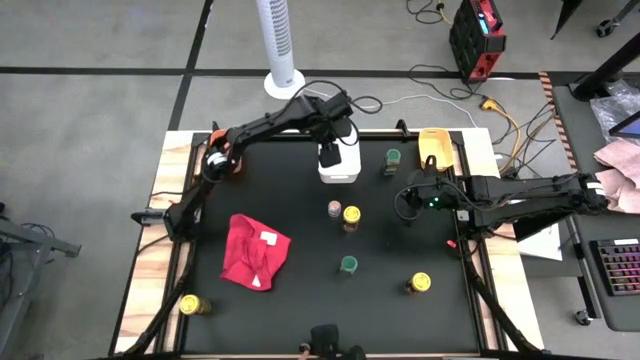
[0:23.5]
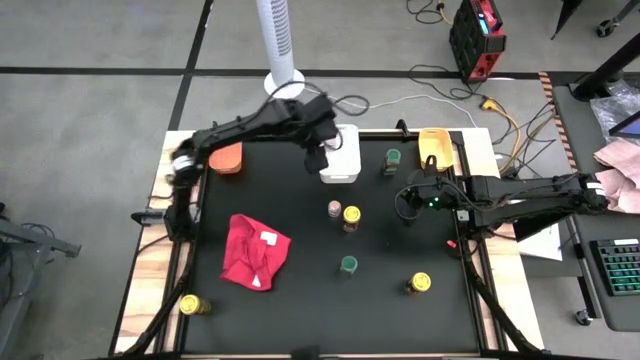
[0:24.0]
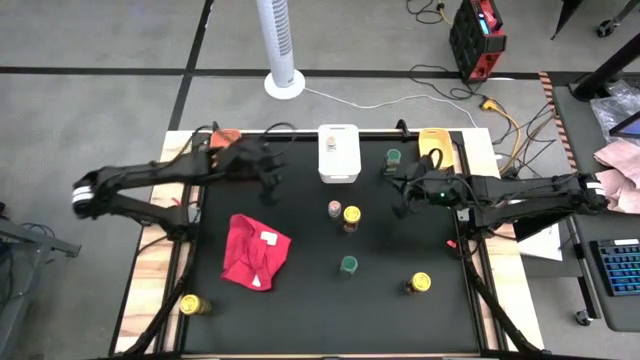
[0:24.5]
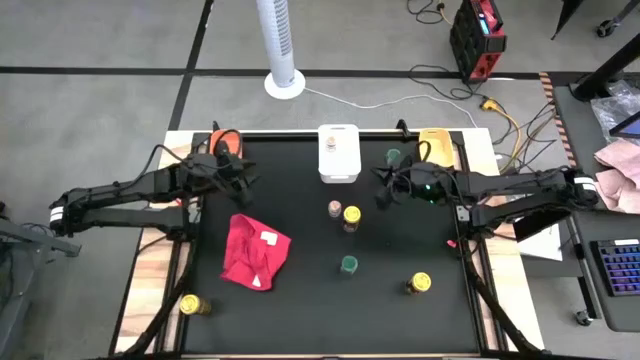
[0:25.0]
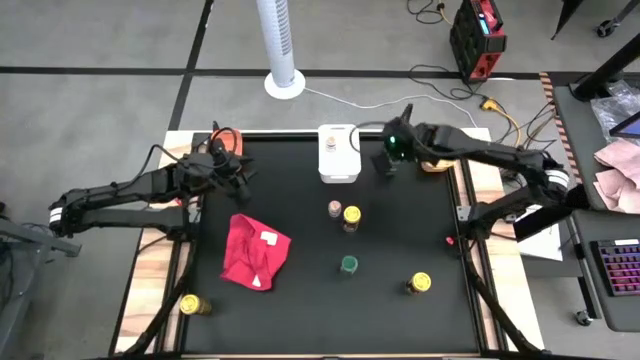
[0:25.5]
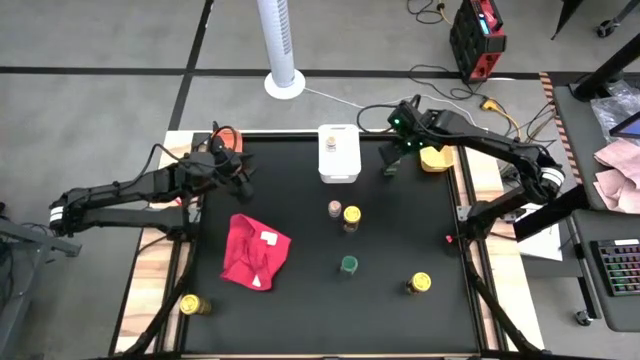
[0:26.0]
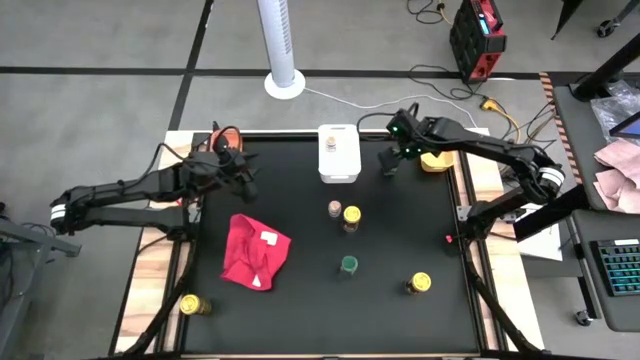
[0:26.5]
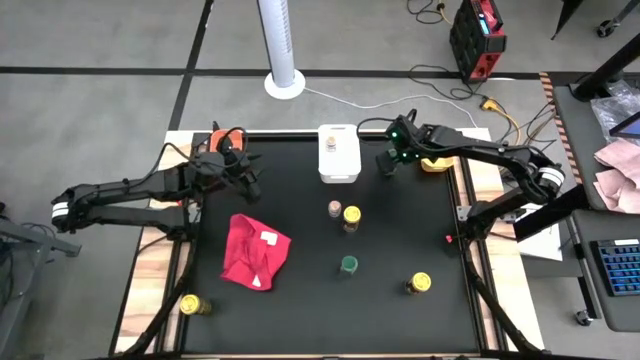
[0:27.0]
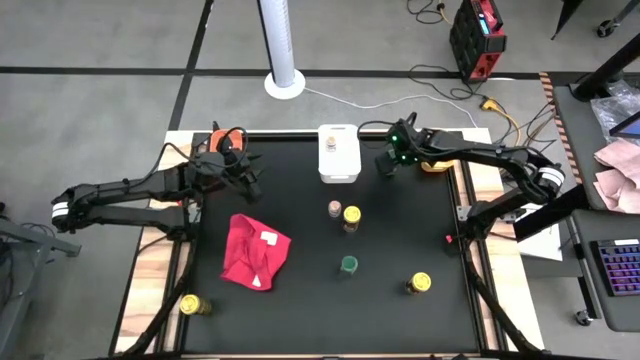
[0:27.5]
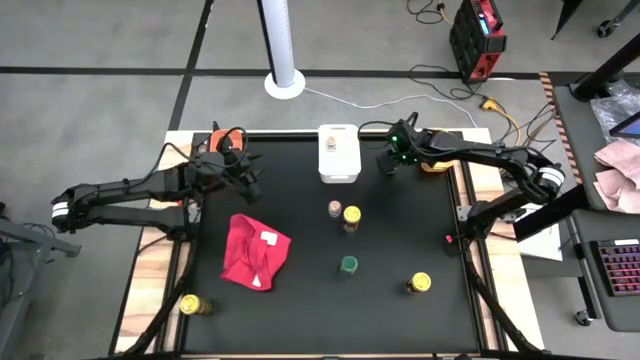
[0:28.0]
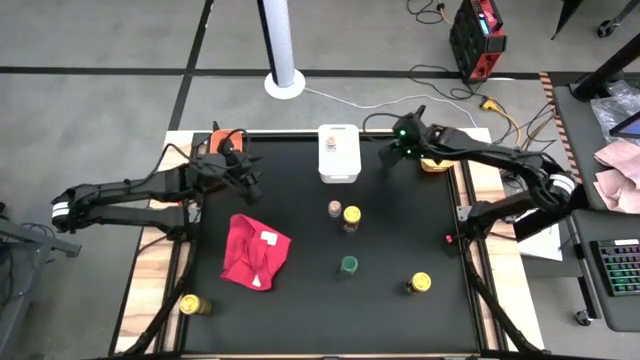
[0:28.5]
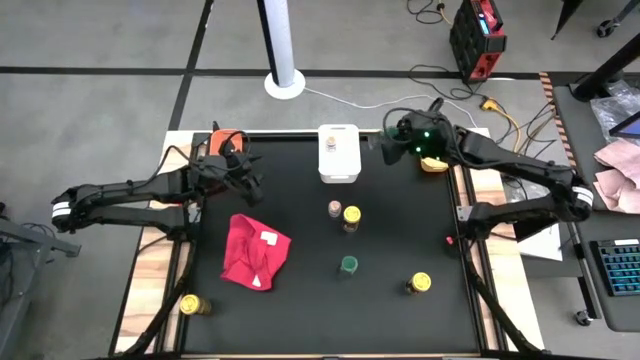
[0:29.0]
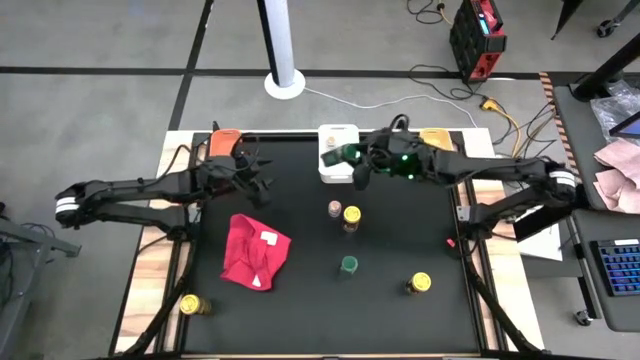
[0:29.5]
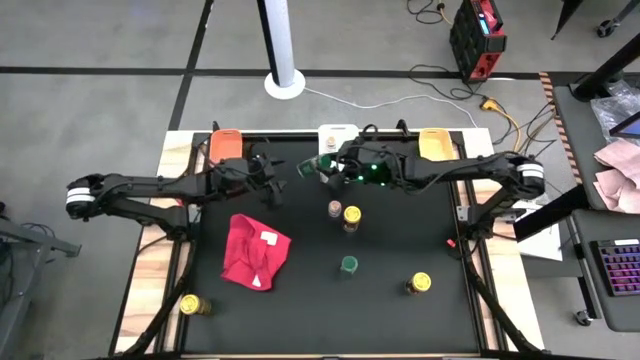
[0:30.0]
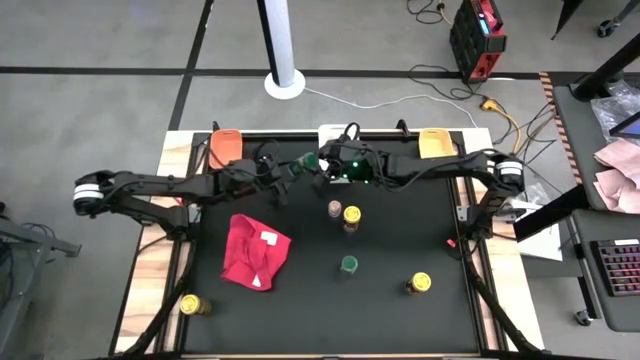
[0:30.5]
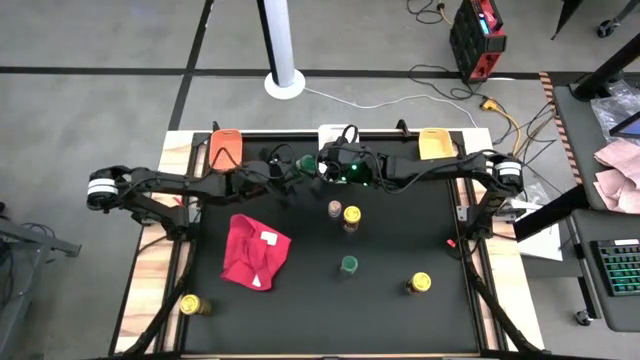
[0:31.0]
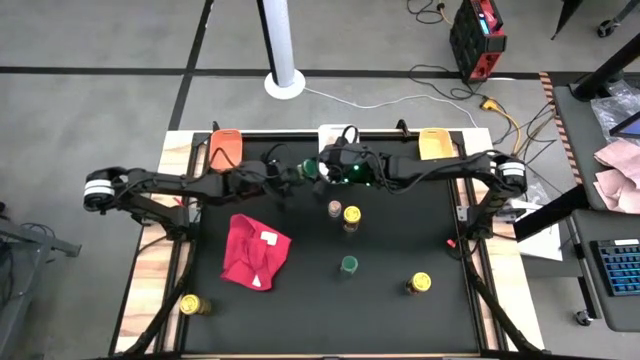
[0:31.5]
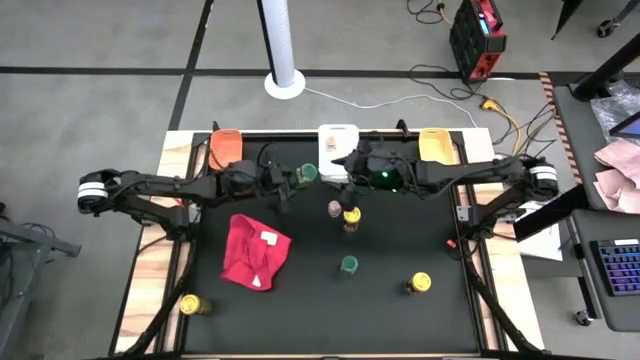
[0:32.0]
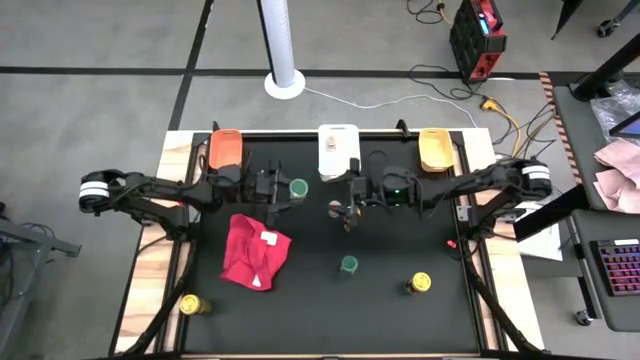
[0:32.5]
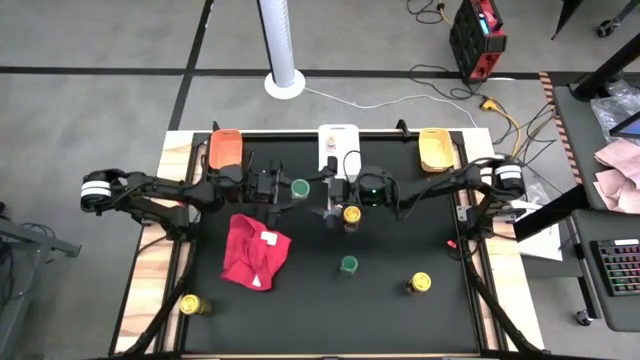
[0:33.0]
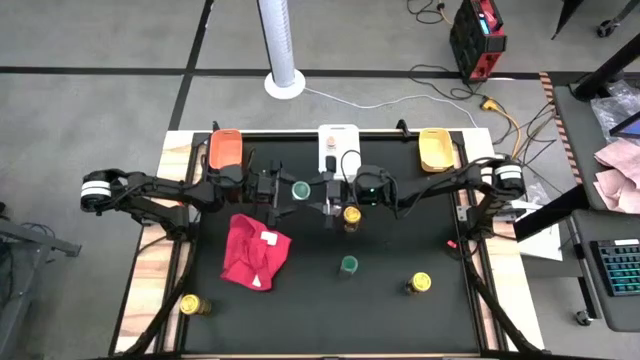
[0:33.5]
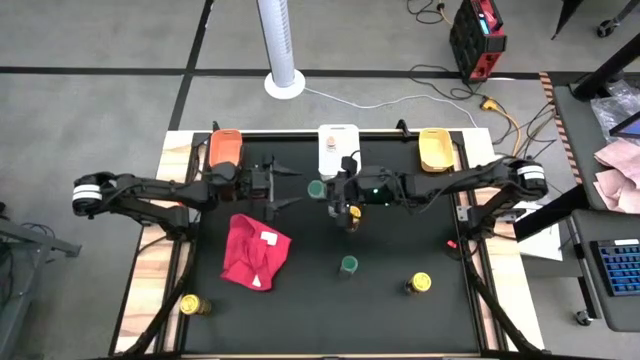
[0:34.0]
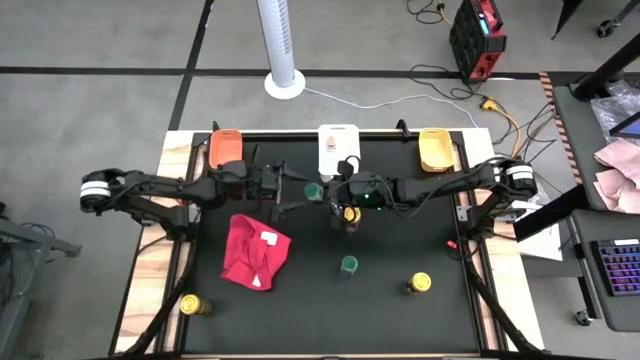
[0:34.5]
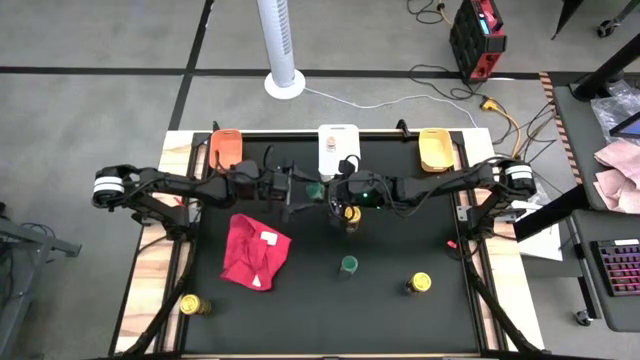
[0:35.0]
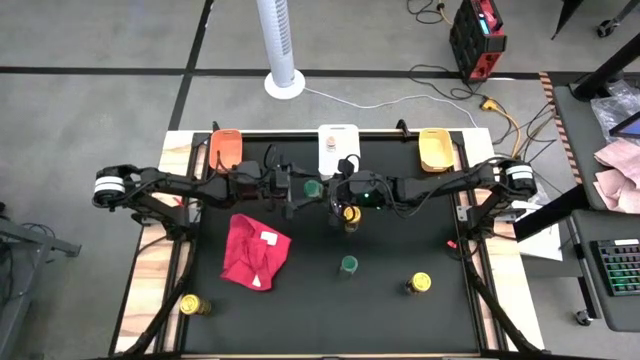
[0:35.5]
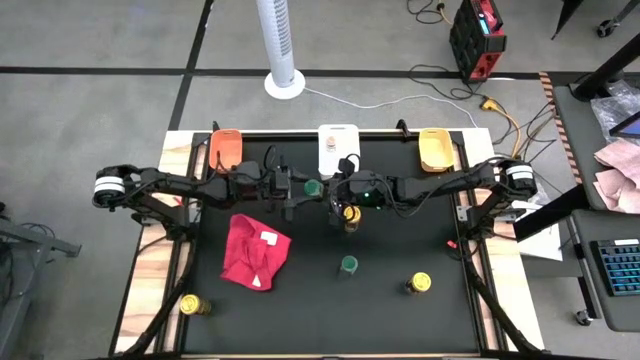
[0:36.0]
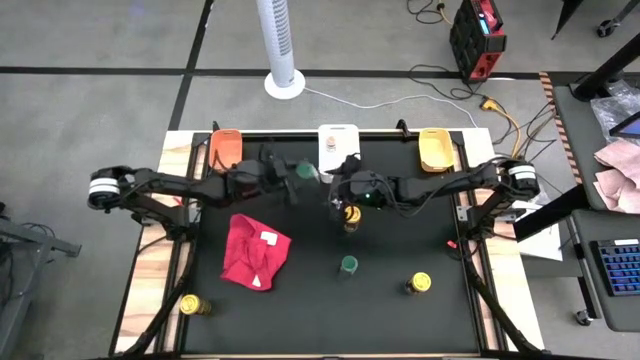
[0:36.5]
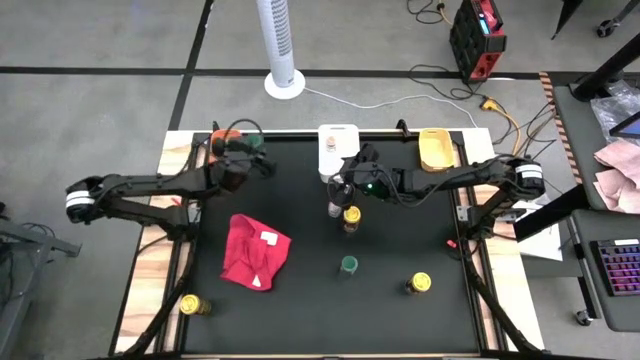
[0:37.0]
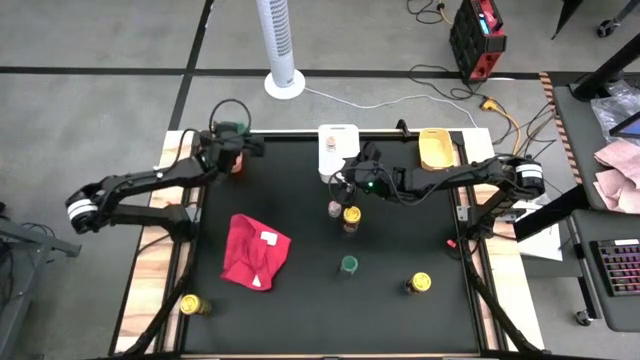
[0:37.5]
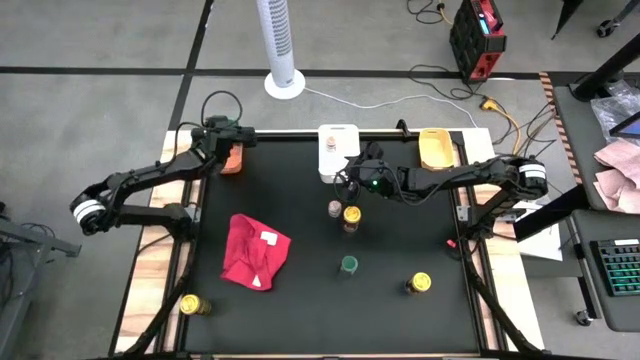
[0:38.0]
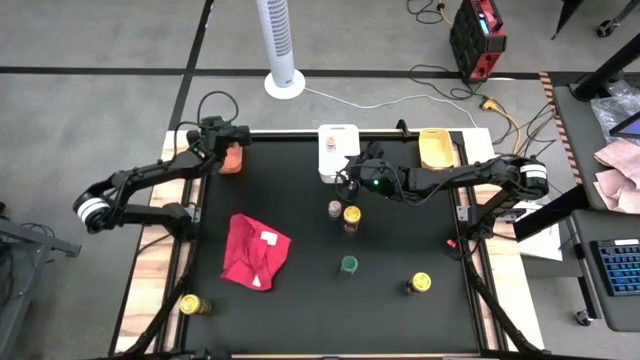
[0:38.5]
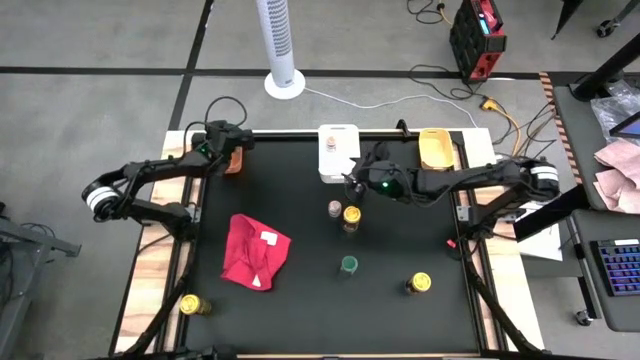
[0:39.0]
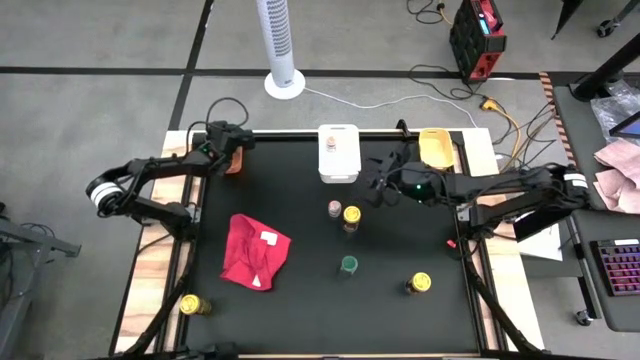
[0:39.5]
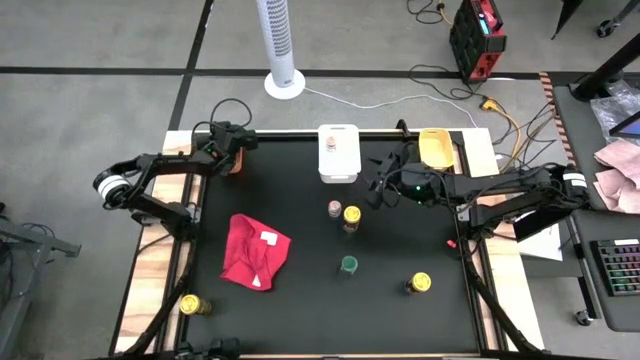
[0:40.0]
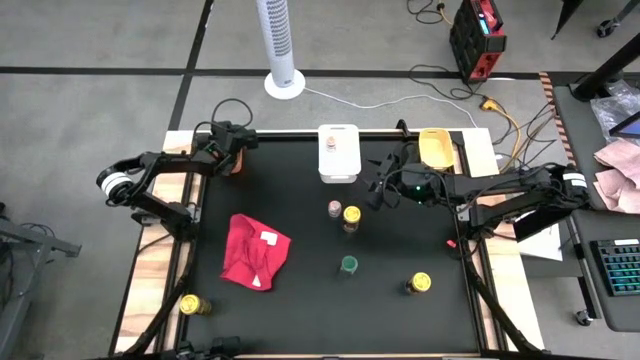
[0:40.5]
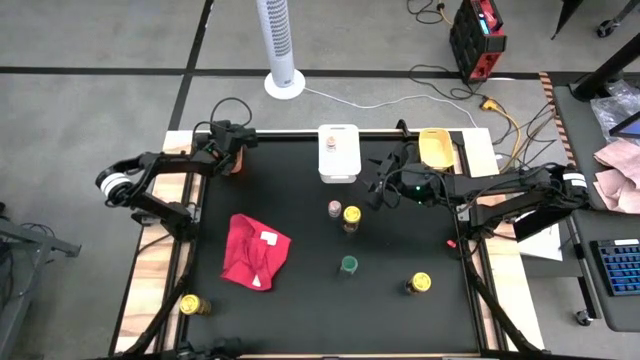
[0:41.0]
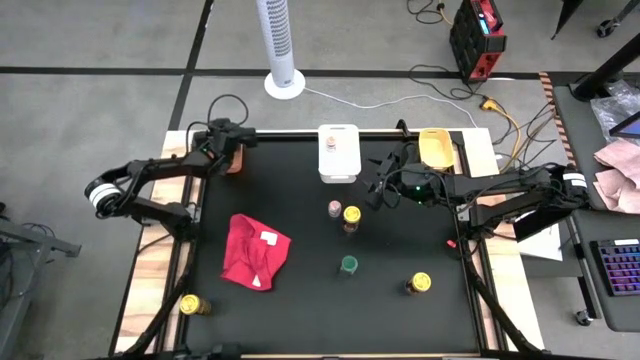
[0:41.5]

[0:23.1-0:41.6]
Task: Sort spices by type
Put the top green seasoning bottle into the orange bin
